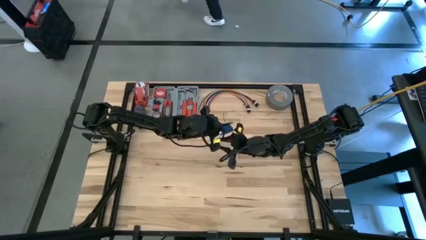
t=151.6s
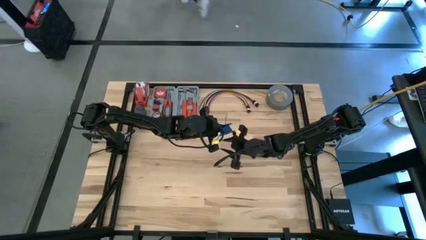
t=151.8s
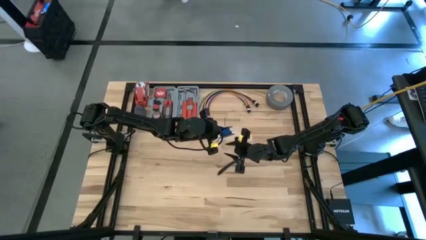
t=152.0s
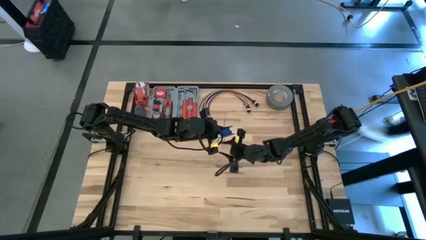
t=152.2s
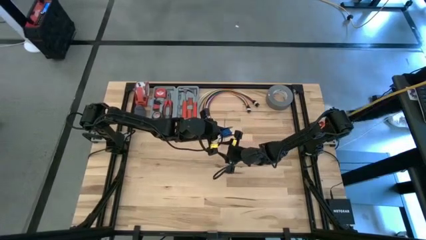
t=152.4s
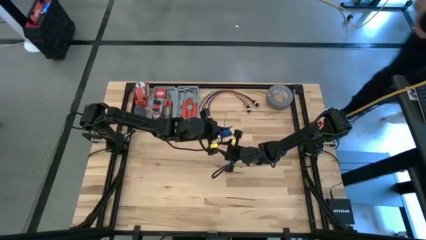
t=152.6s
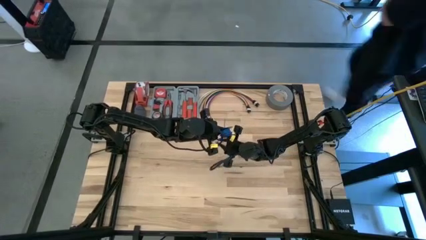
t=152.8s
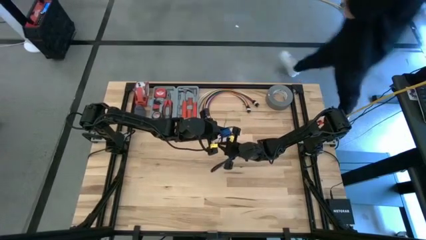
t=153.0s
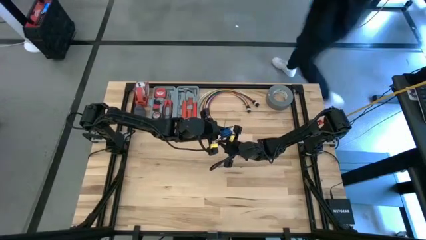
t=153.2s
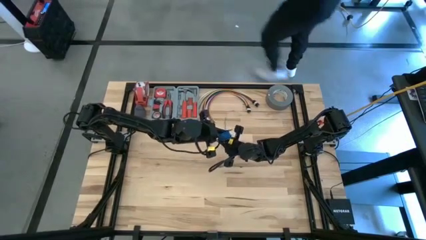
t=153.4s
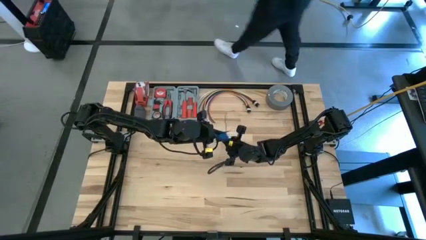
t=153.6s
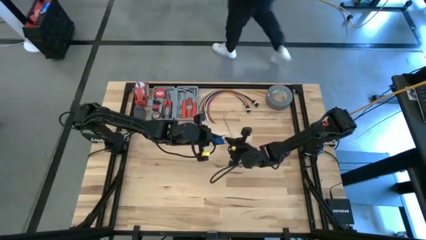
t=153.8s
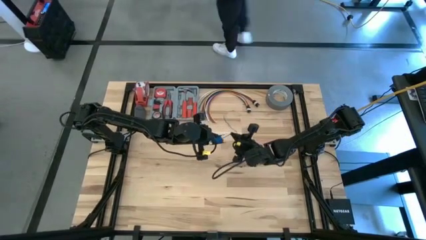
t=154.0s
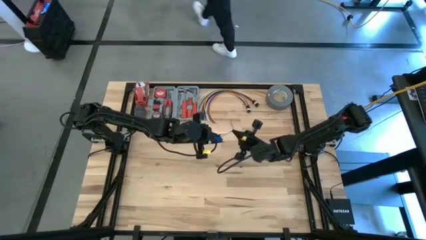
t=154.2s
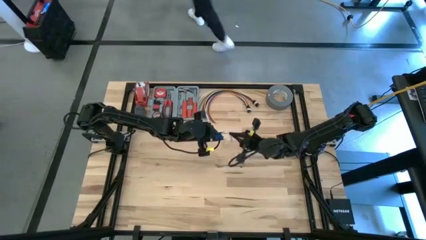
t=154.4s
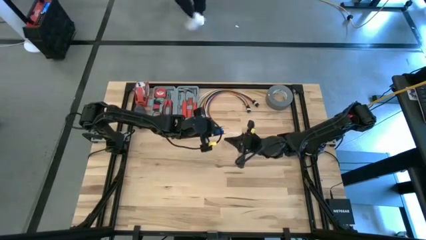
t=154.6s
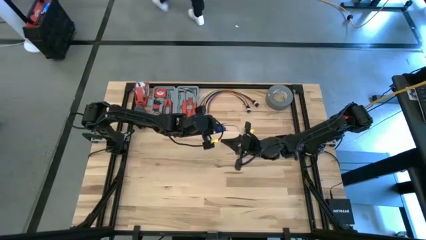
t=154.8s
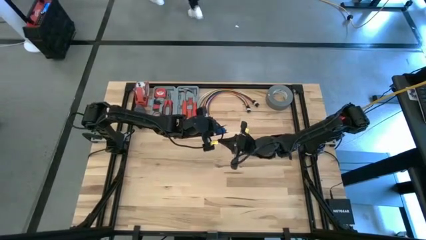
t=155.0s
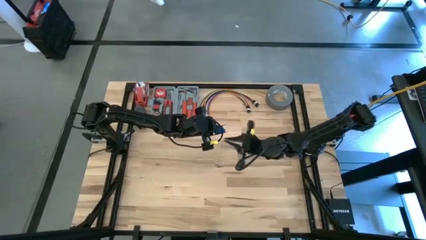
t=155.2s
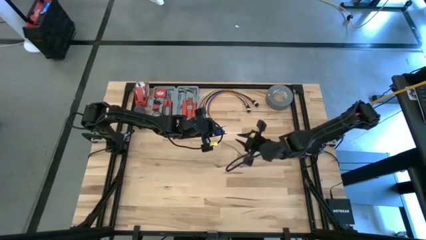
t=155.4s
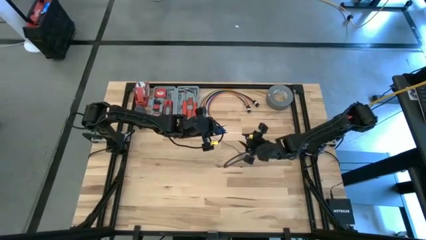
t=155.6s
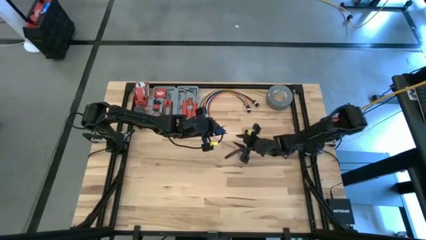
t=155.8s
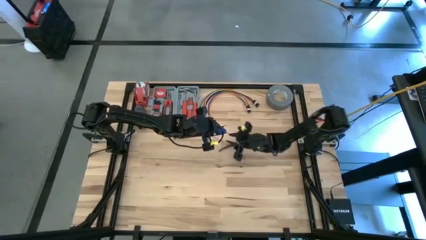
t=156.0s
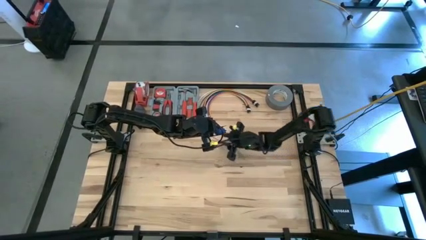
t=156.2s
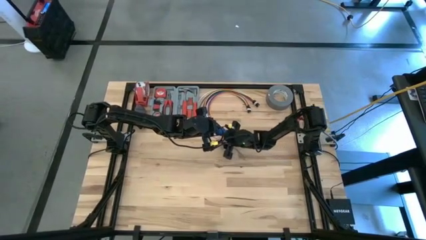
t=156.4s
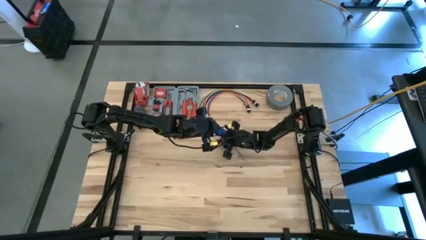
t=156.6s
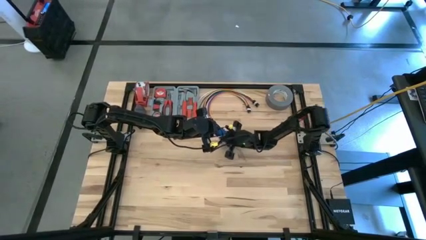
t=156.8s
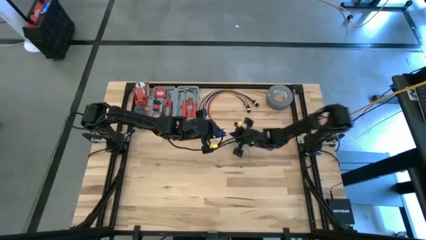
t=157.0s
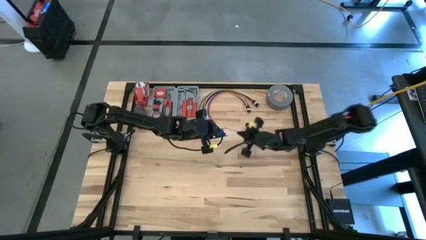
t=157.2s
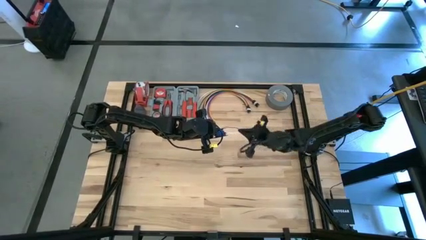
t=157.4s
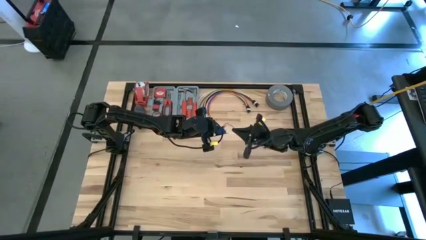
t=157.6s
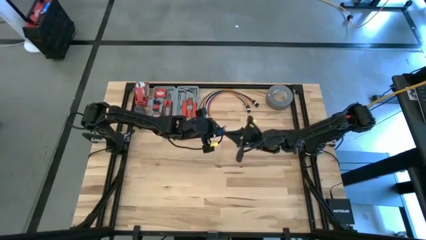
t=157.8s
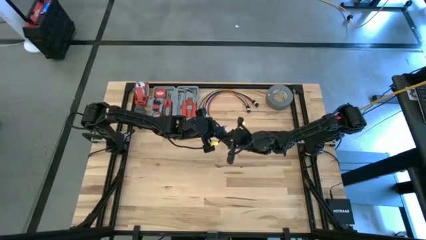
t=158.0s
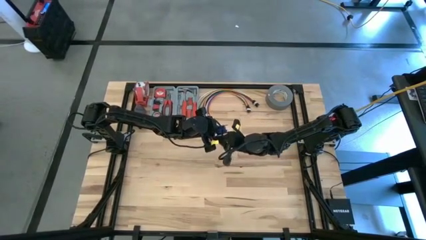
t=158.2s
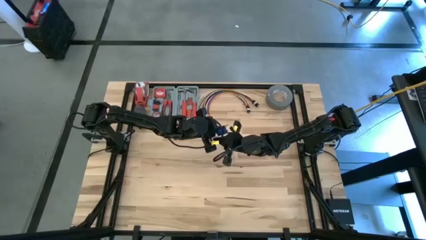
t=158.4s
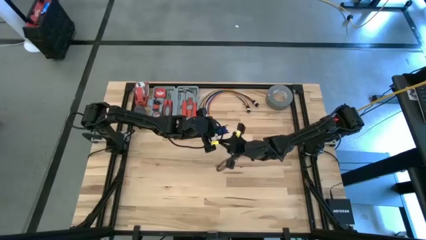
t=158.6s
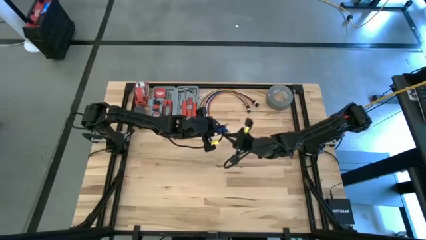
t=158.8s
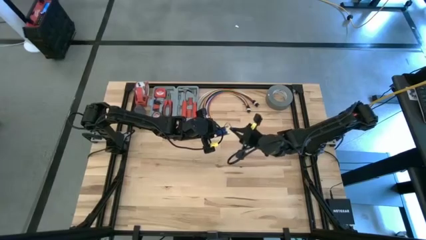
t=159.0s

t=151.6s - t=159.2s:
Task: Coil cords
Coil the blue wire onto the black spool

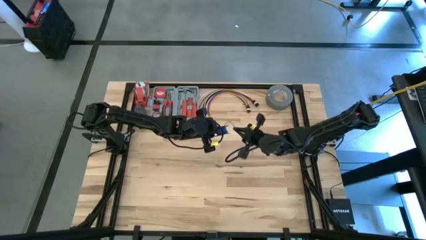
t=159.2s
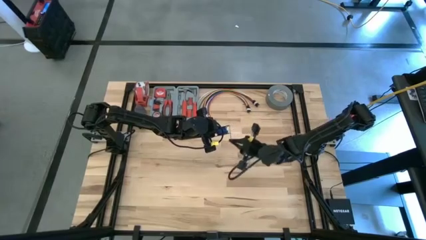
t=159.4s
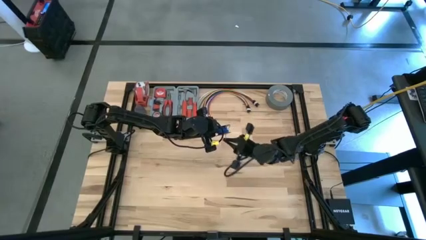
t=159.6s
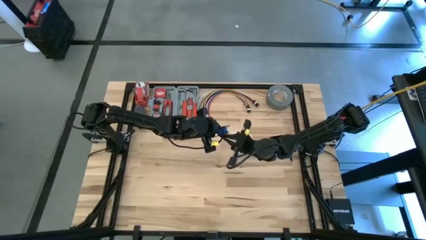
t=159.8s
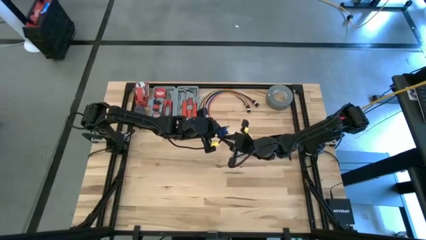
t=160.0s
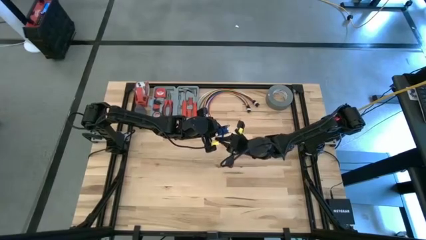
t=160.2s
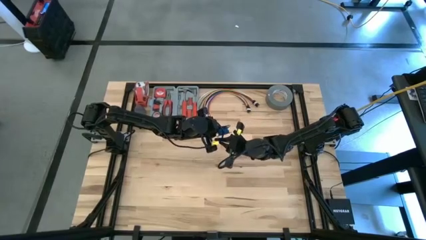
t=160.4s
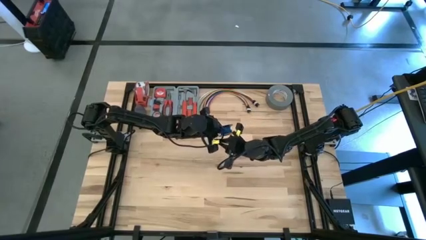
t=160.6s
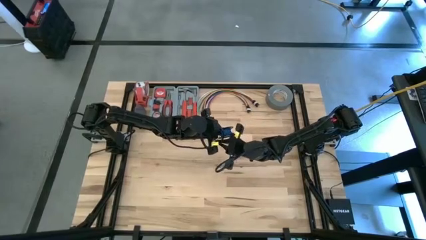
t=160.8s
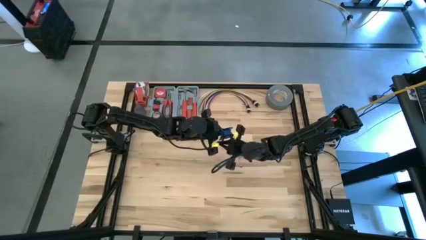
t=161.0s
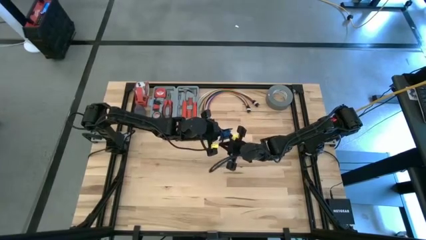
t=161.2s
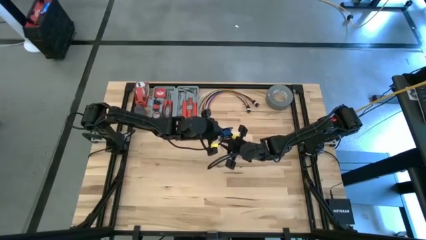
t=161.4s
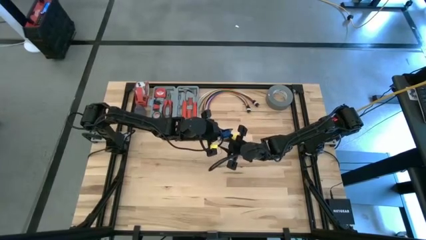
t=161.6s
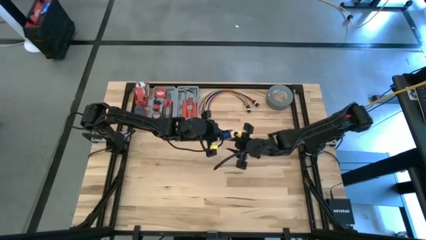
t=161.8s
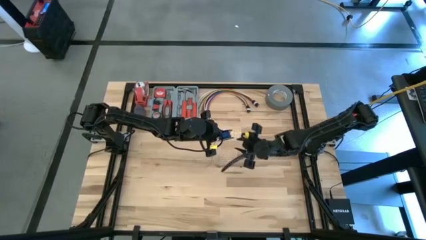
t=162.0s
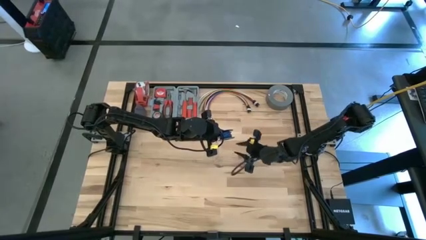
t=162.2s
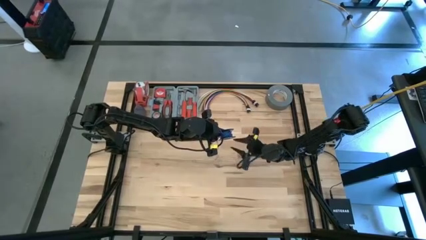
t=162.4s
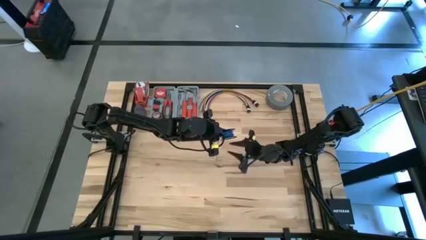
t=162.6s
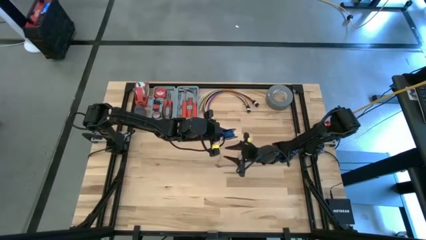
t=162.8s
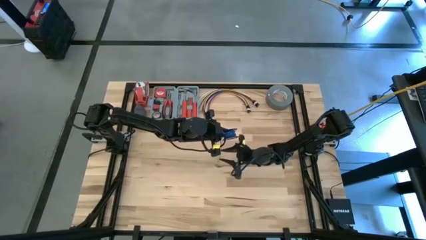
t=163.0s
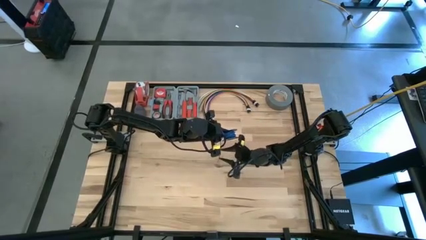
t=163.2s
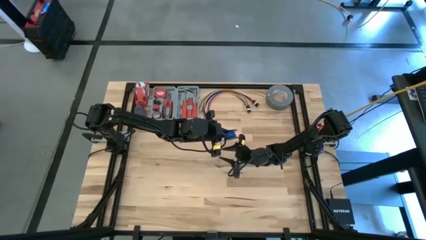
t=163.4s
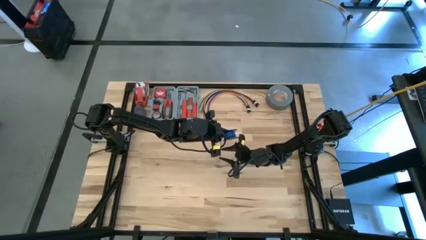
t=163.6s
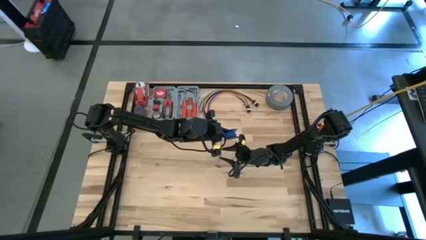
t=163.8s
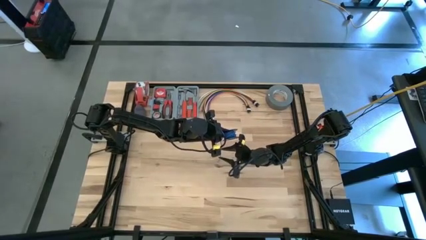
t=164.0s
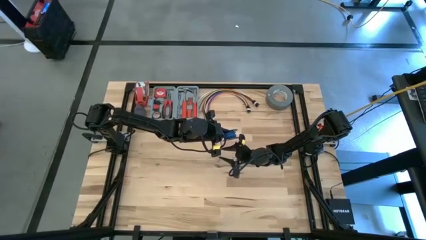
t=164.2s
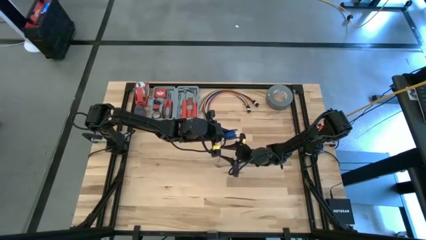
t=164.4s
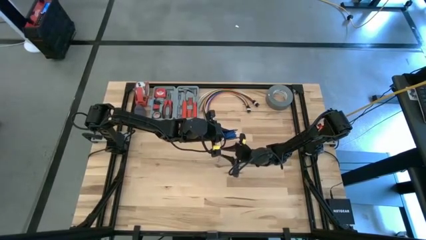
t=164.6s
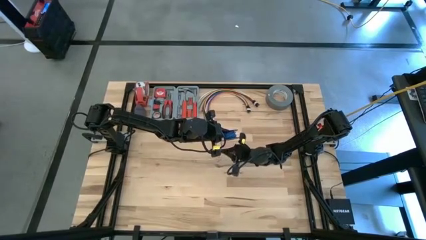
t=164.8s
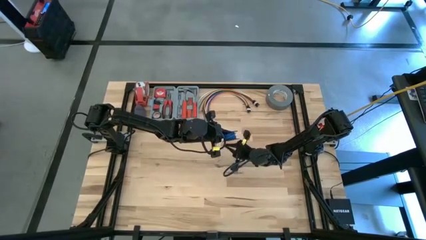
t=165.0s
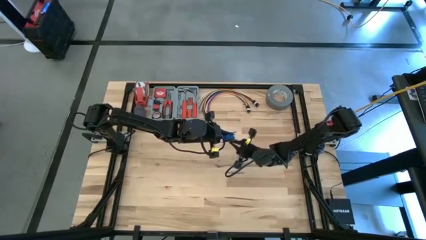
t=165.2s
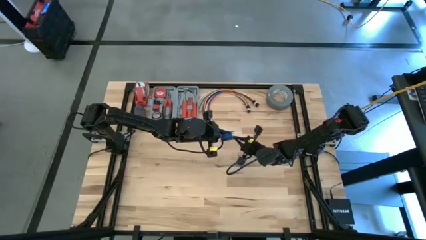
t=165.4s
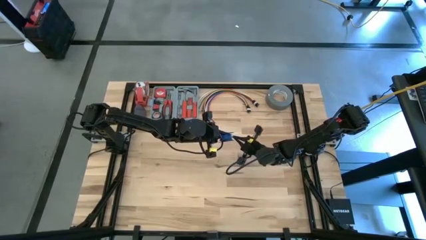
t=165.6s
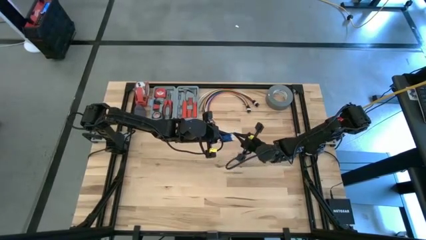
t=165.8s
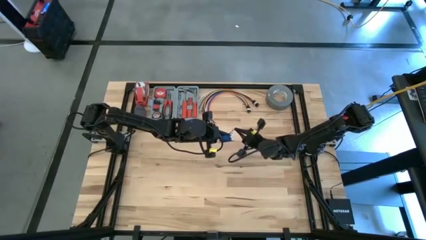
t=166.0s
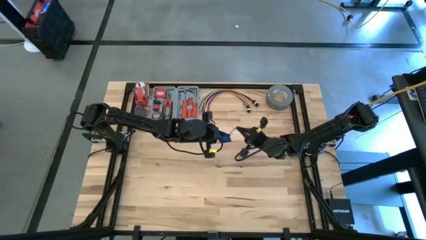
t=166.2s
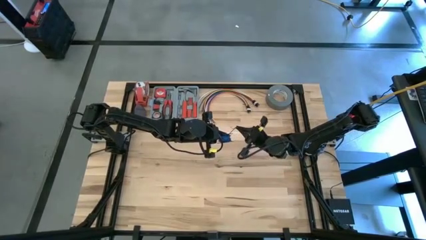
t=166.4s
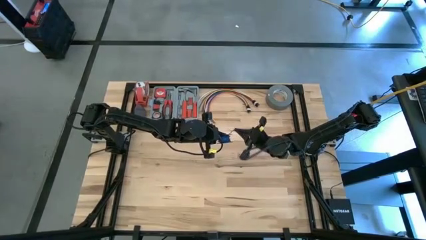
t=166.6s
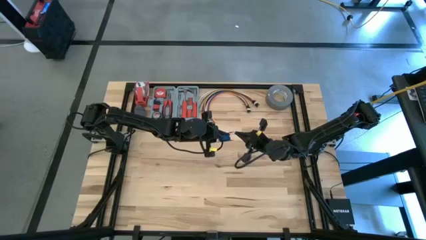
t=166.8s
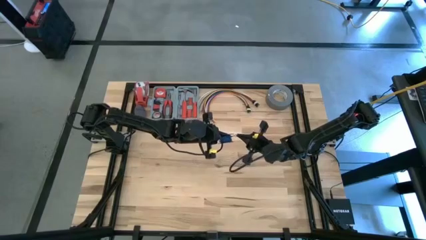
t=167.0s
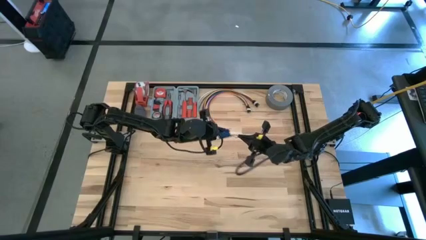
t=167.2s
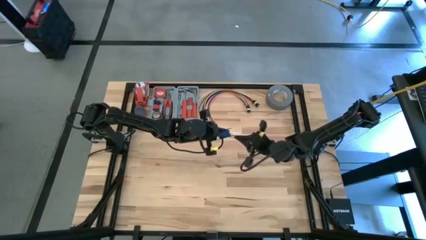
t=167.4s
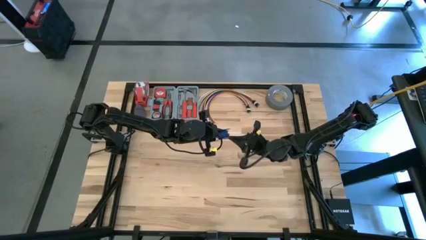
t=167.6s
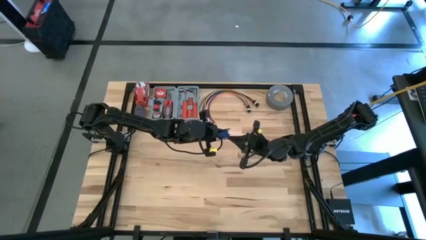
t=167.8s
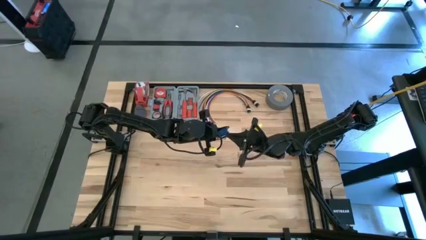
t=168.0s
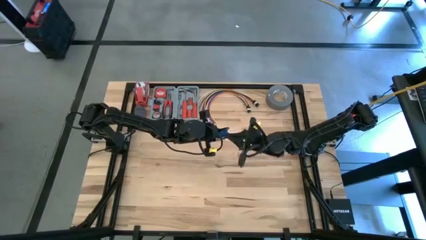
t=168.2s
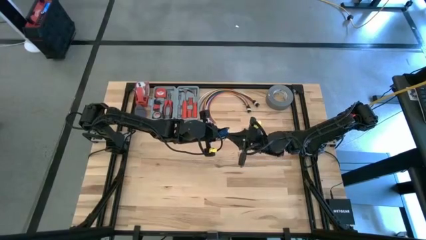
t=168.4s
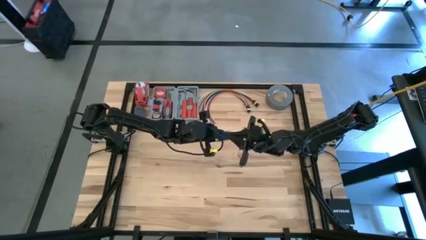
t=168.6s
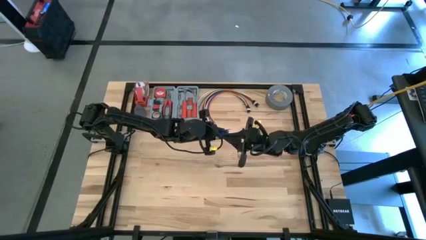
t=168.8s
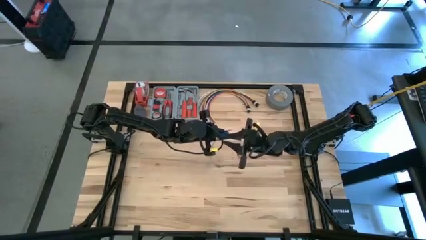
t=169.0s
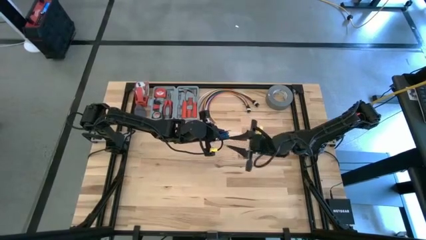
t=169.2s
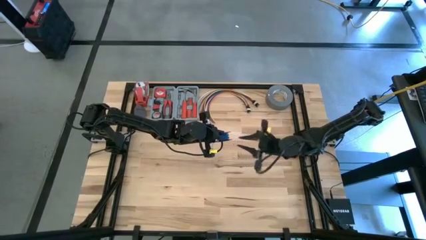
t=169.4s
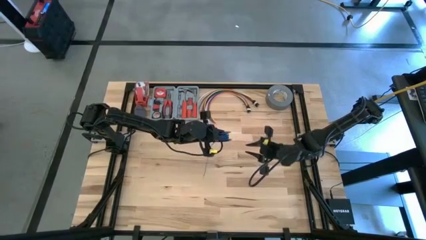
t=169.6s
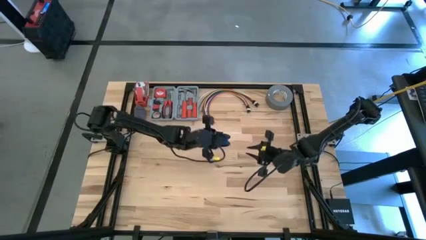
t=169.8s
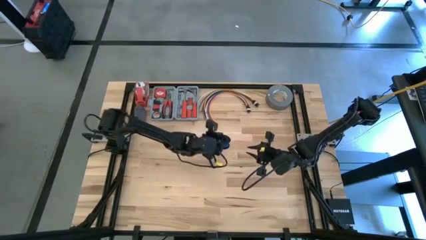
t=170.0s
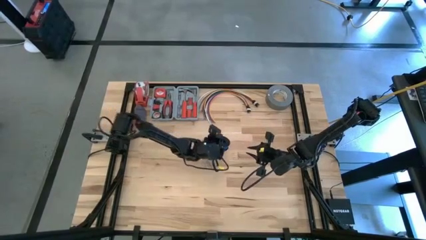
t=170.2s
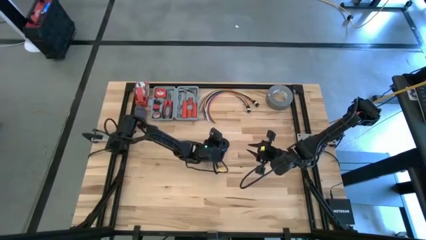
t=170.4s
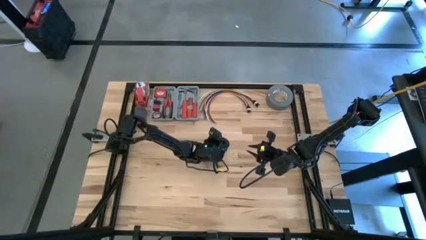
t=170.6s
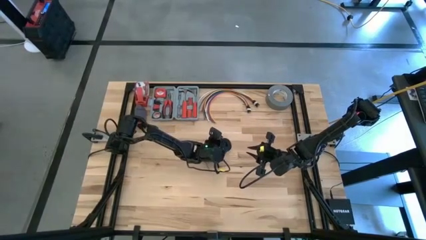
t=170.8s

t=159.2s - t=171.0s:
Coil the blue wire onto the black spool
